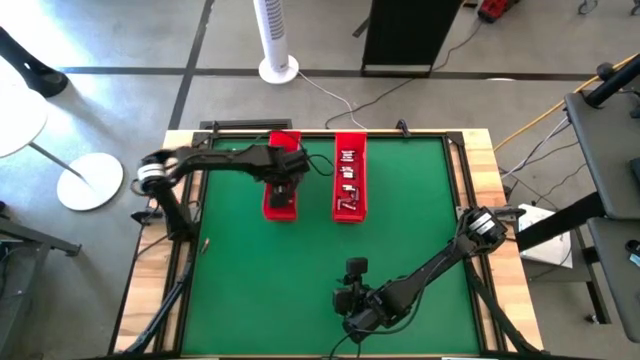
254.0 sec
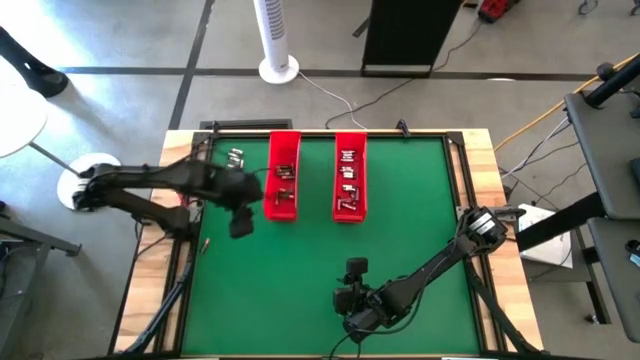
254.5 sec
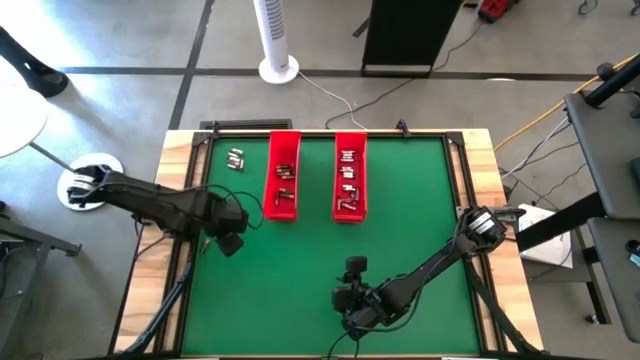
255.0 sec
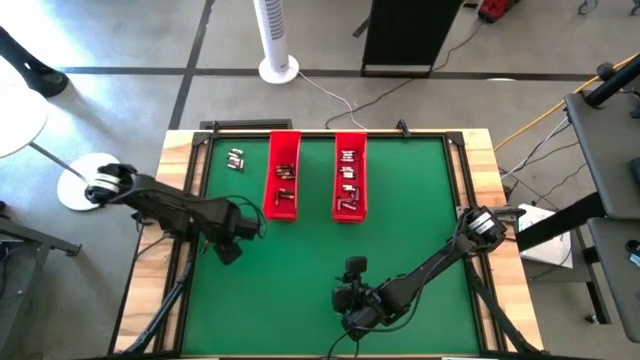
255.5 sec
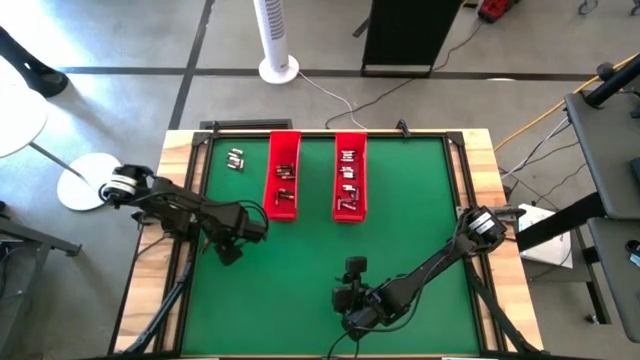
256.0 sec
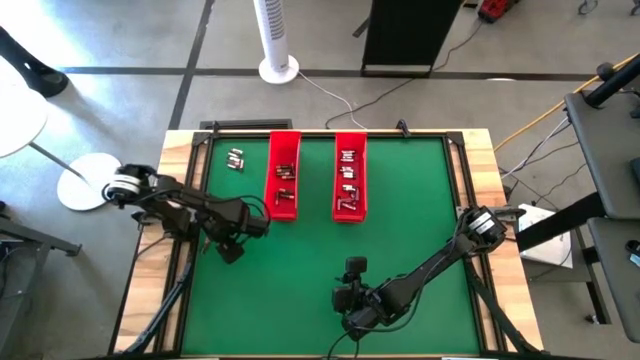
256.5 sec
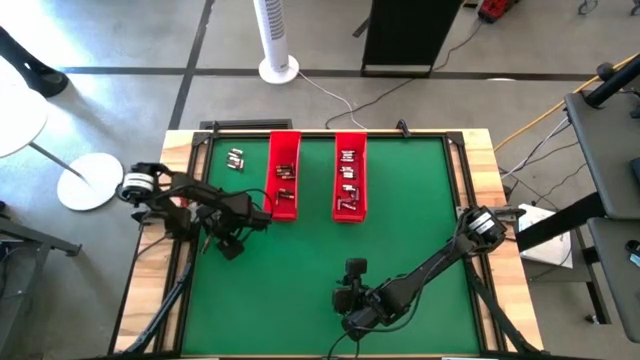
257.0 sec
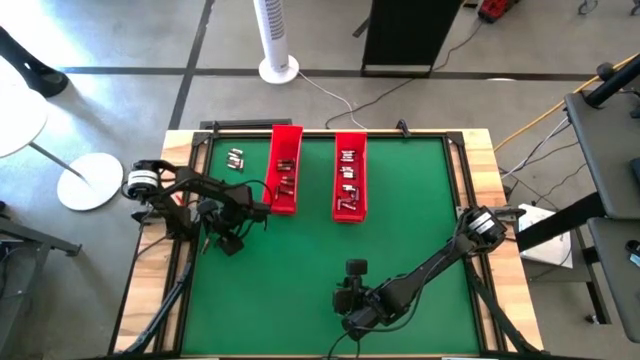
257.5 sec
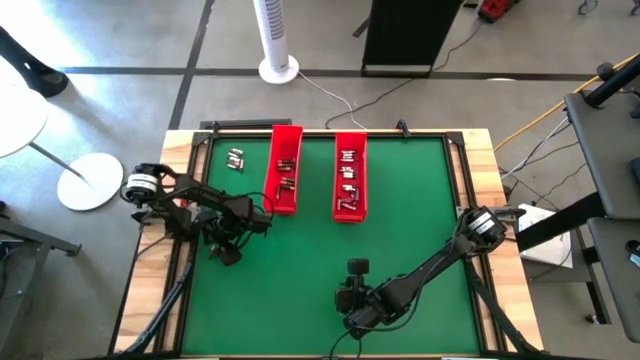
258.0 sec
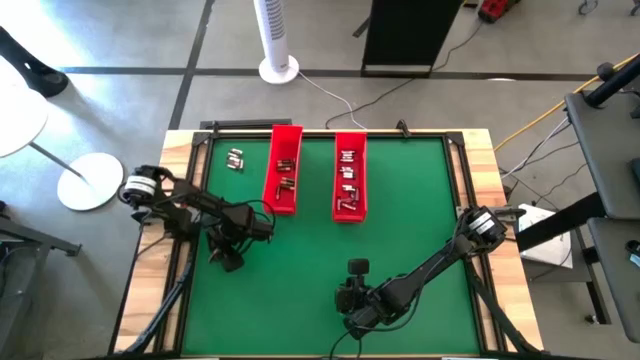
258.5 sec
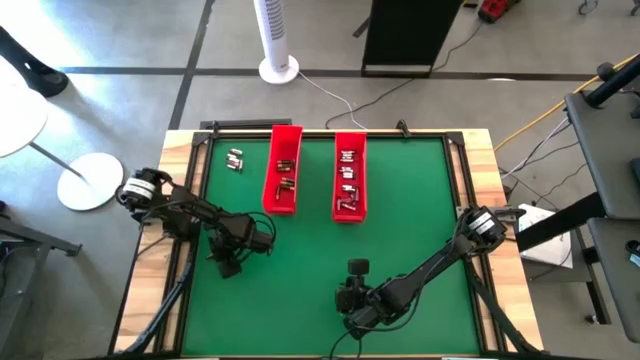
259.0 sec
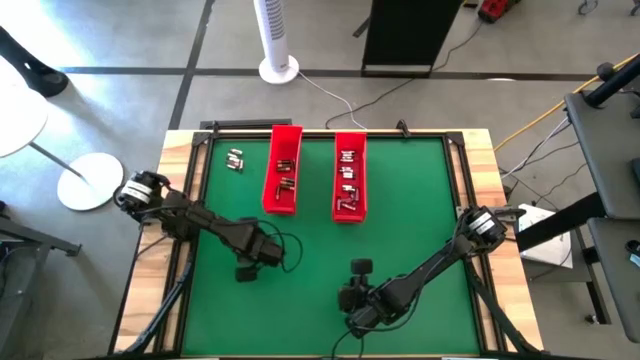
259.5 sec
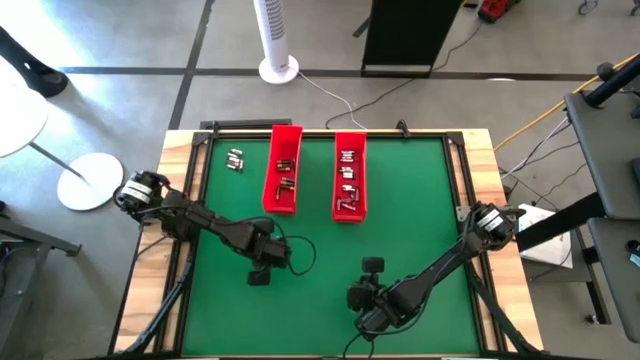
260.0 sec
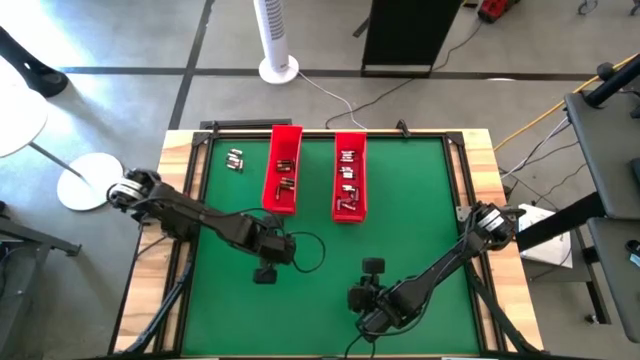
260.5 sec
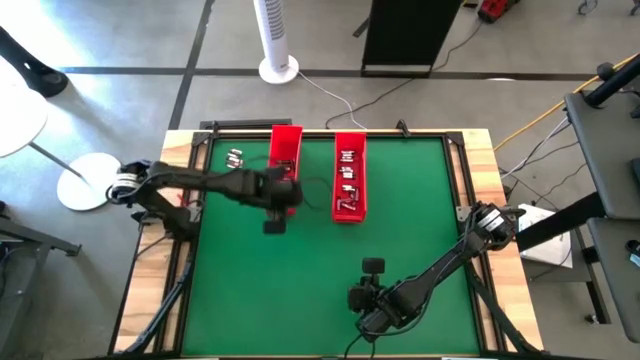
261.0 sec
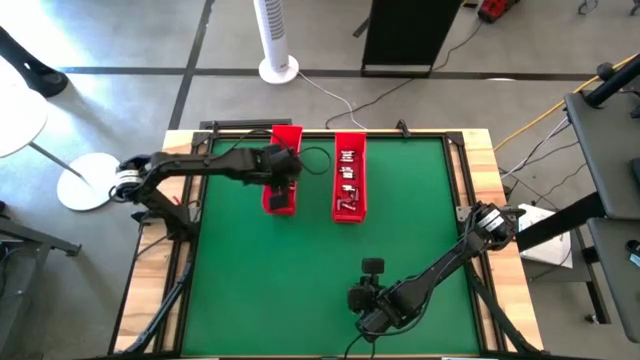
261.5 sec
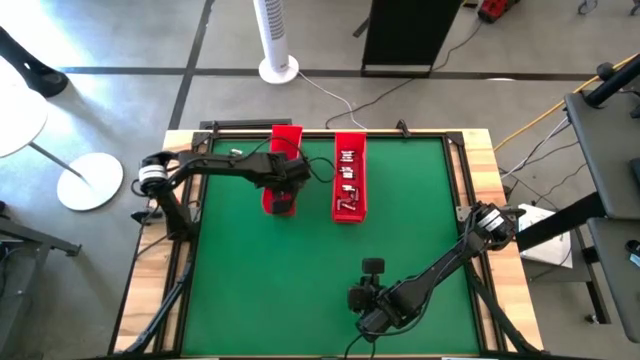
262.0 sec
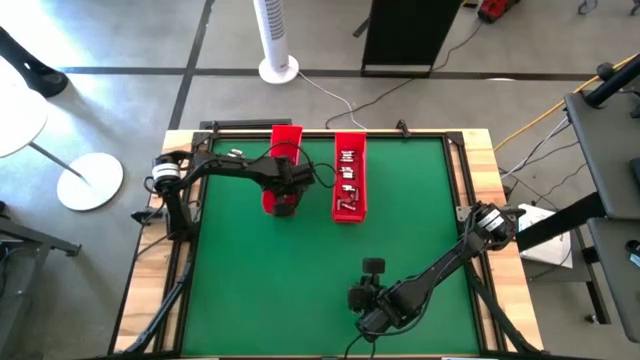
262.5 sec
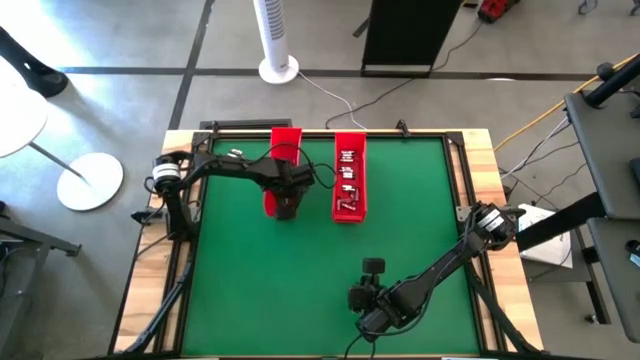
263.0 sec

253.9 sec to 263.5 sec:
Task: Sort batteries
Put the black battery into the left red bin

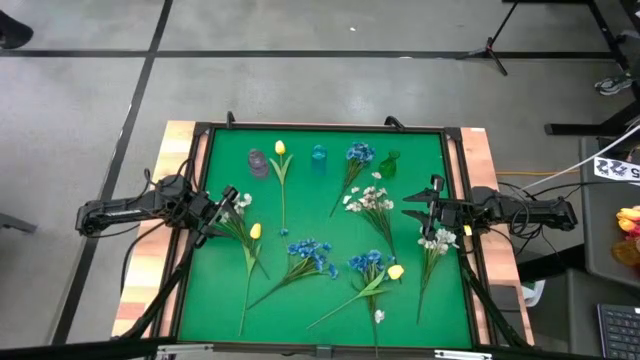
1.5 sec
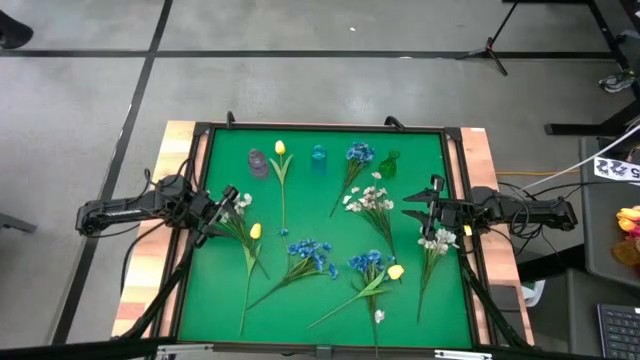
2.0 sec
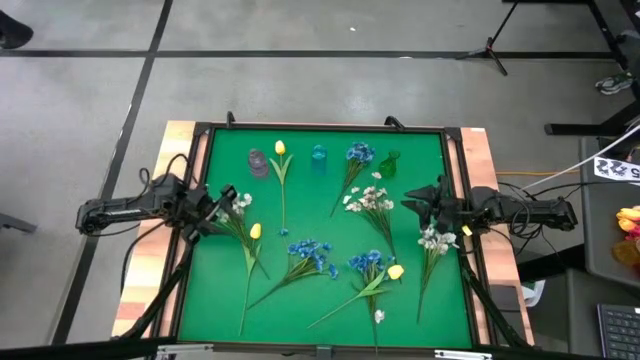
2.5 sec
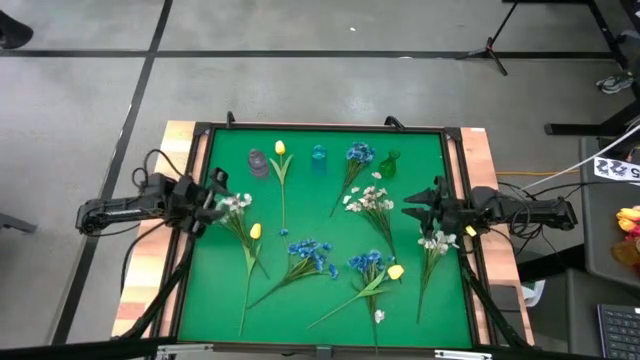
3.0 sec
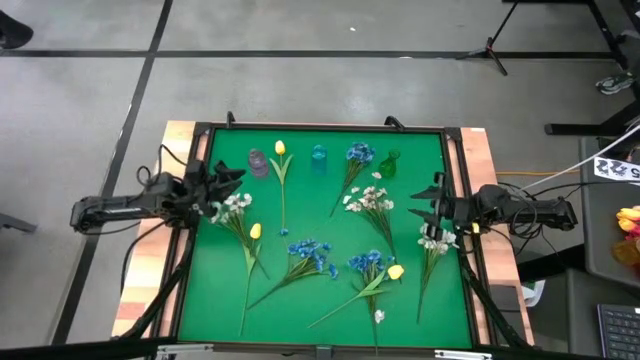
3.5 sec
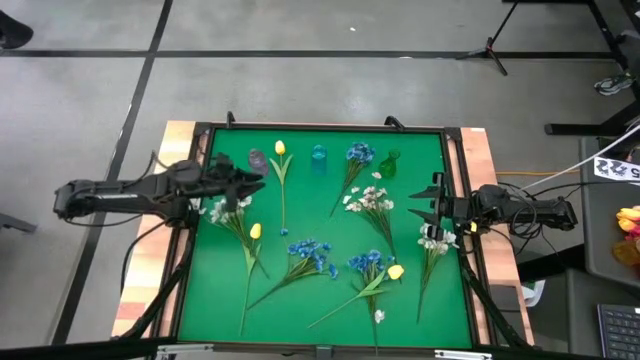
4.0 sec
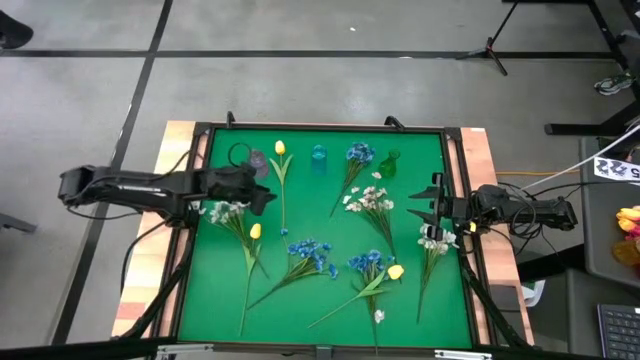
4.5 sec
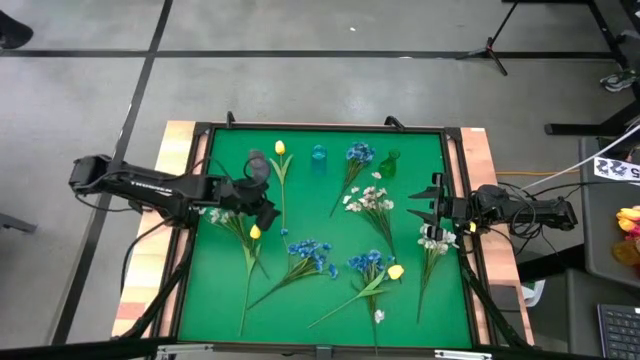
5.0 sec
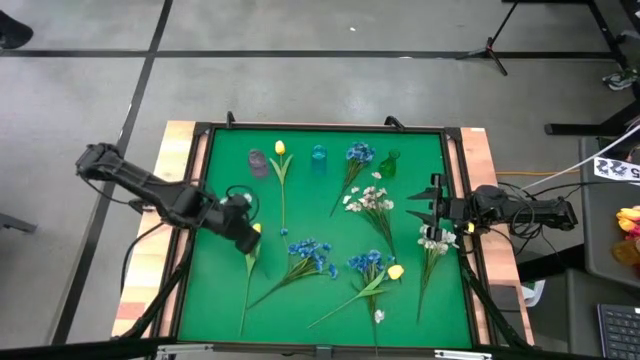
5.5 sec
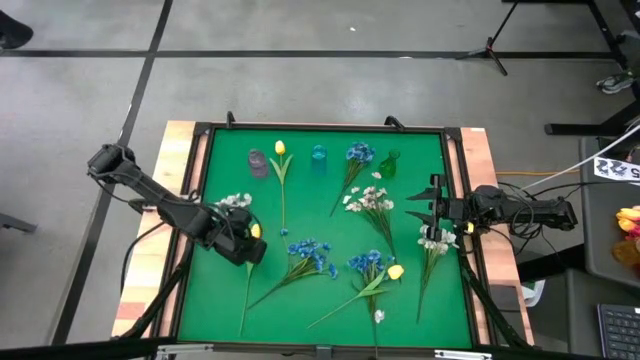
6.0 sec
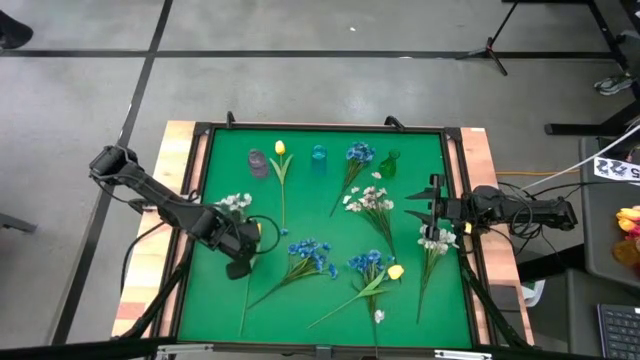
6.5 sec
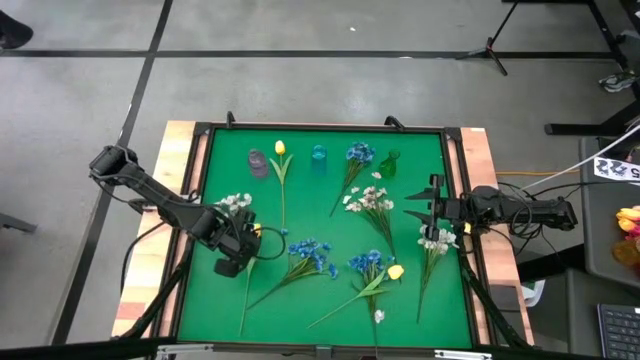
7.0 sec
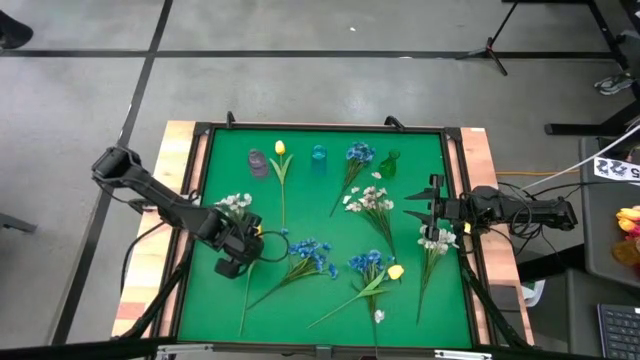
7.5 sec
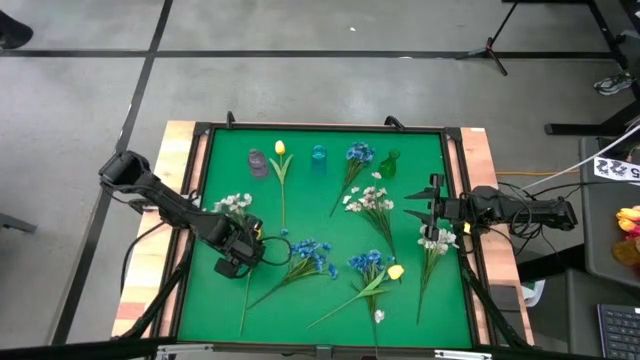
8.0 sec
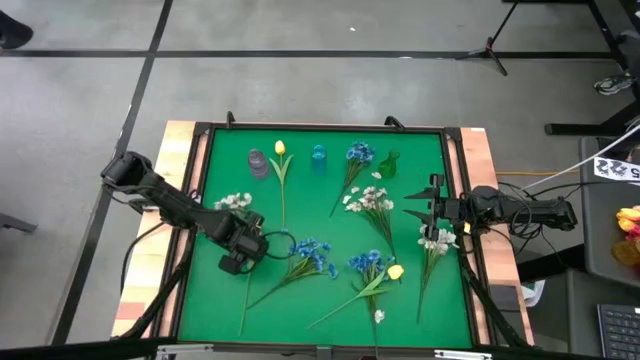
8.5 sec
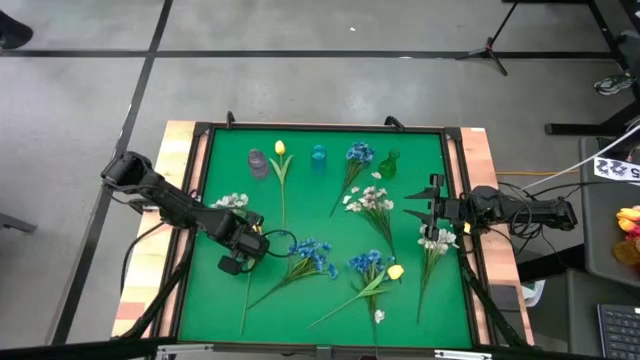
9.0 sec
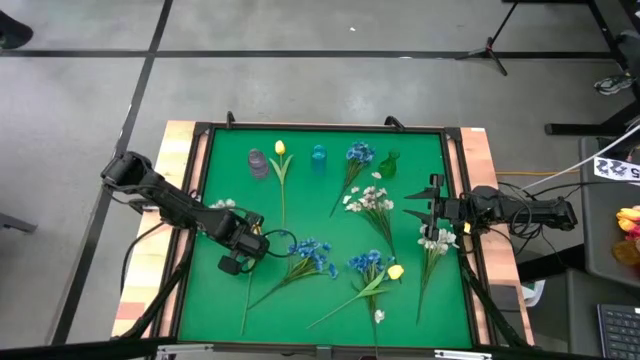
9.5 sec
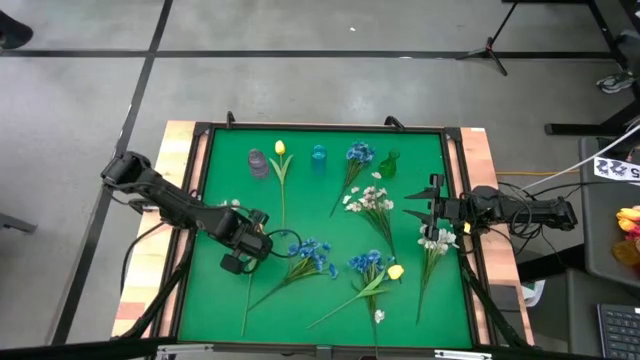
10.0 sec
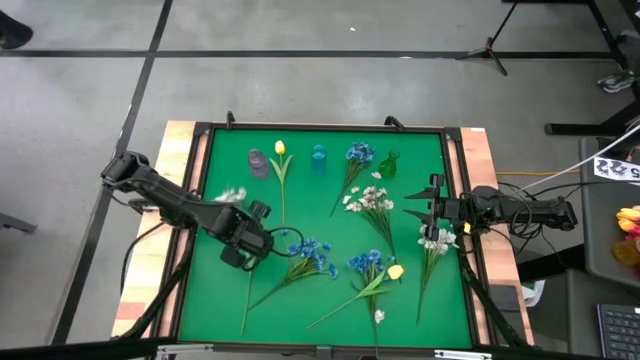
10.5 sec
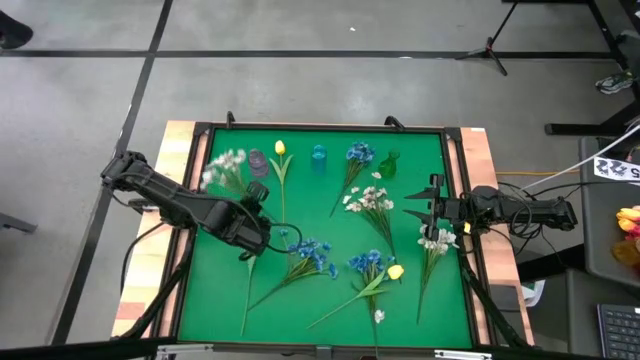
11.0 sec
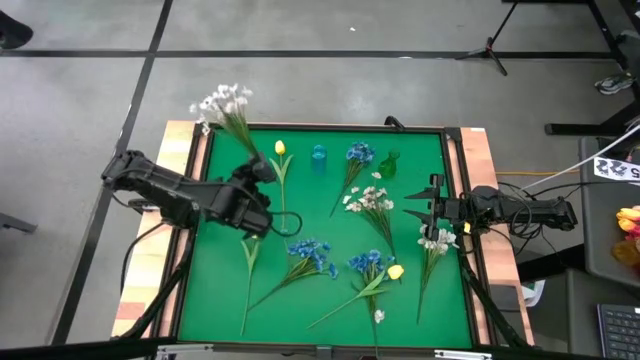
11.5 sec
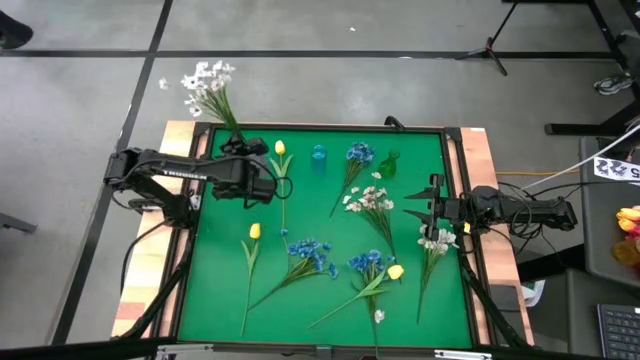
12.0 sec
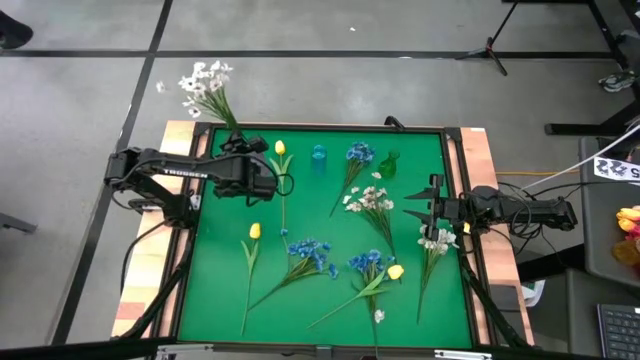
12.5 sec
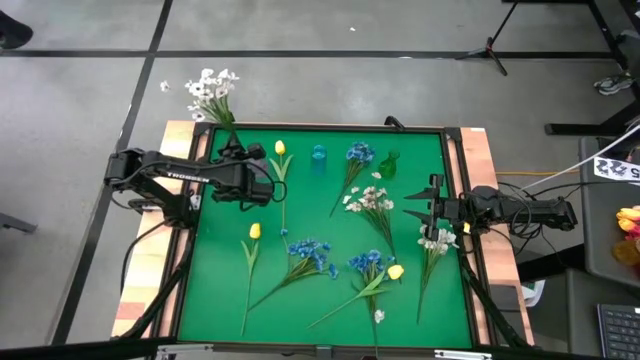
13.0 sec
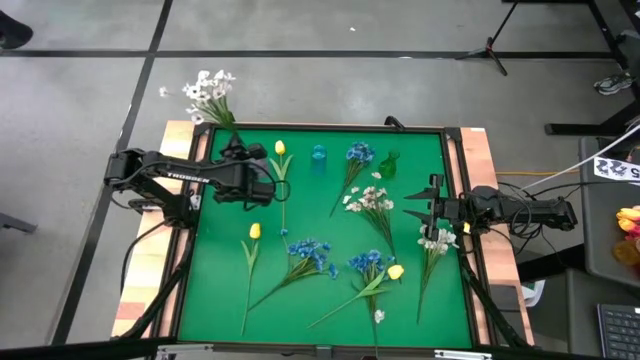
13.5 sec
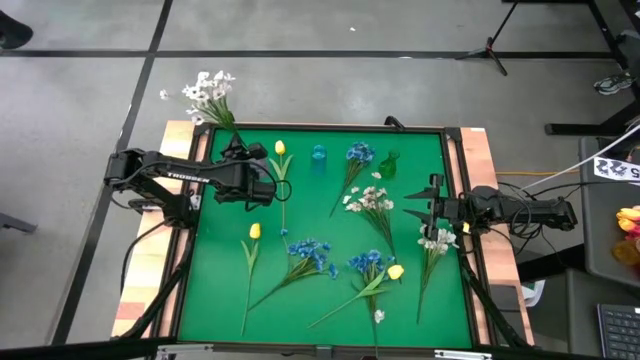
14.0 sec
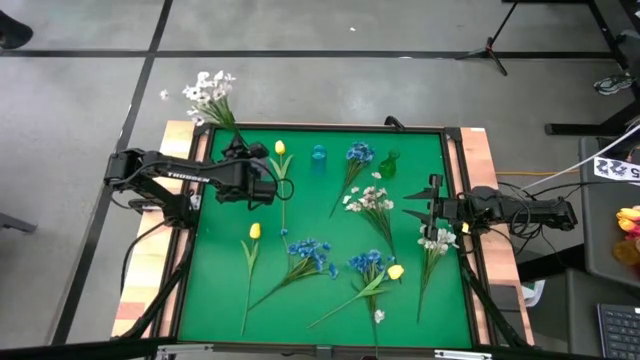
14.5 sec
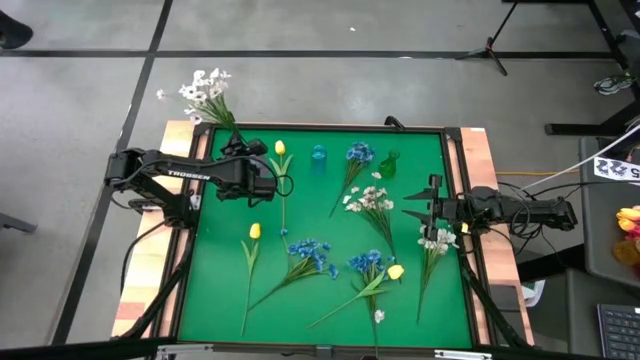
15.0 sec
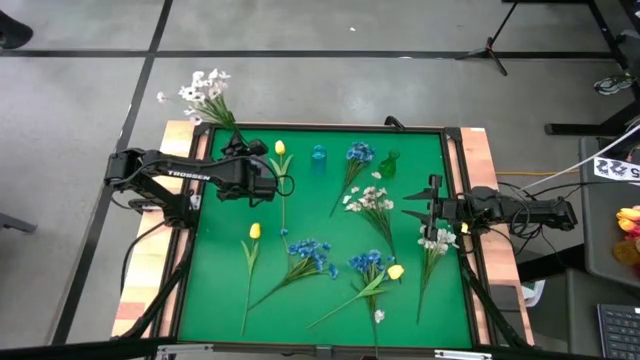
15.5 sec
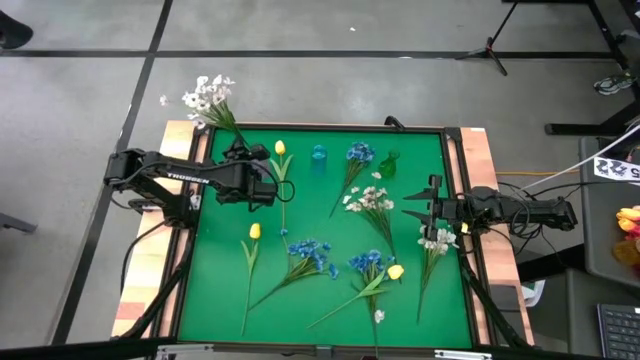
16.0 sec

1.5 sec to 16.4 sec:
Task: Sort flowers into vase by color
Put the top left white flowers into the violet vase
